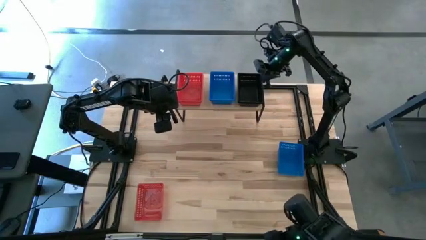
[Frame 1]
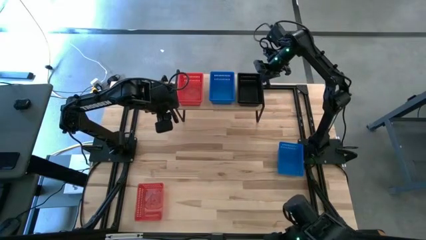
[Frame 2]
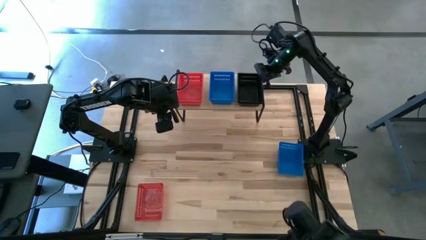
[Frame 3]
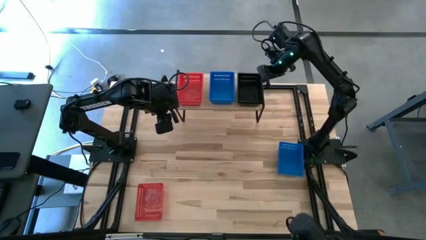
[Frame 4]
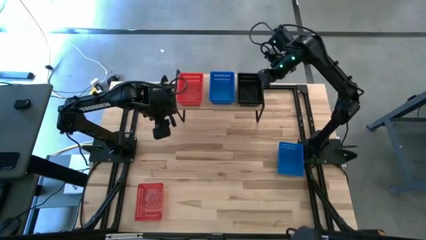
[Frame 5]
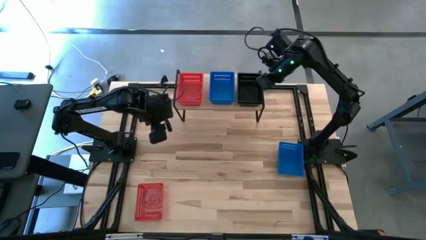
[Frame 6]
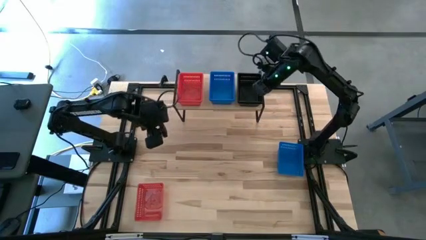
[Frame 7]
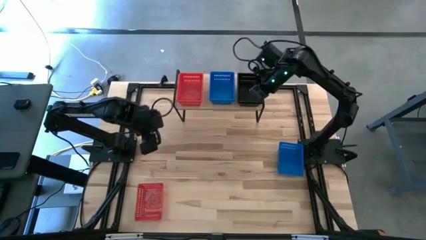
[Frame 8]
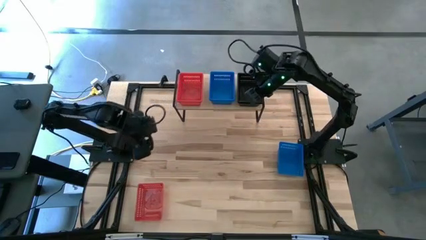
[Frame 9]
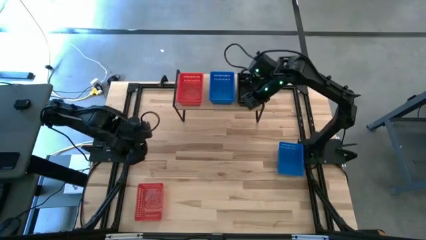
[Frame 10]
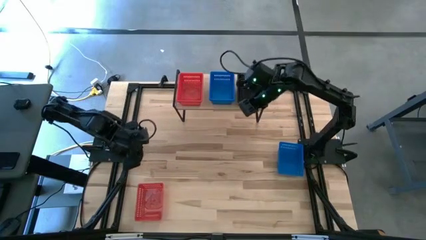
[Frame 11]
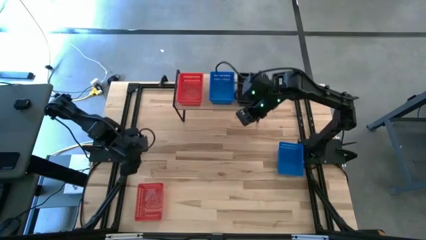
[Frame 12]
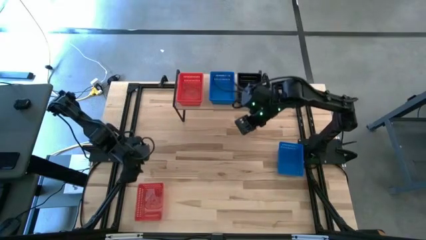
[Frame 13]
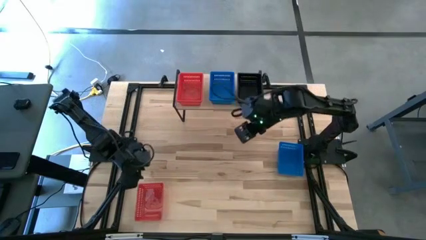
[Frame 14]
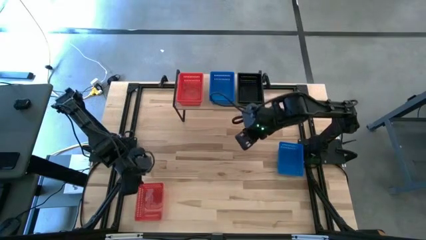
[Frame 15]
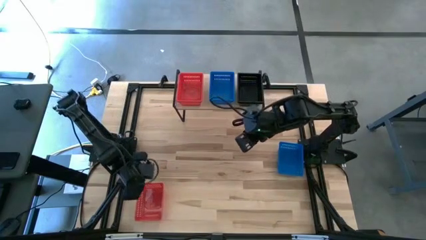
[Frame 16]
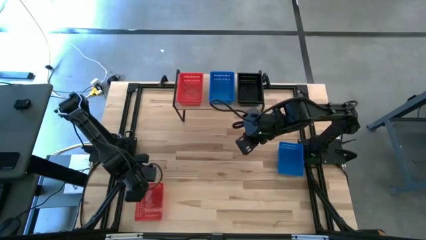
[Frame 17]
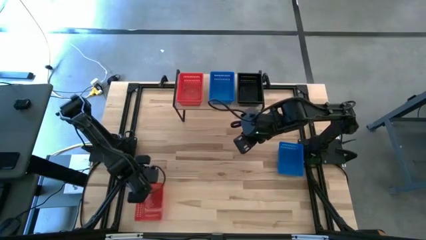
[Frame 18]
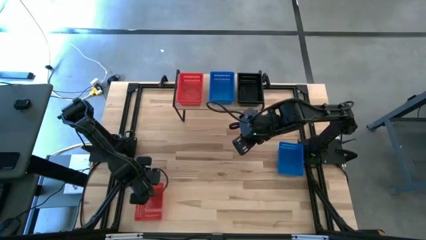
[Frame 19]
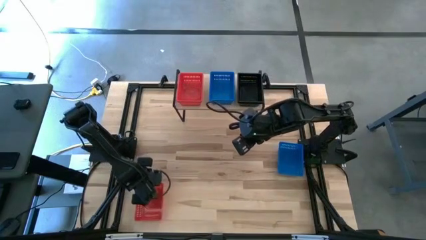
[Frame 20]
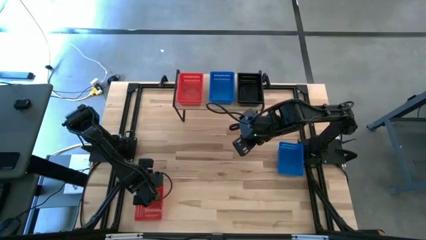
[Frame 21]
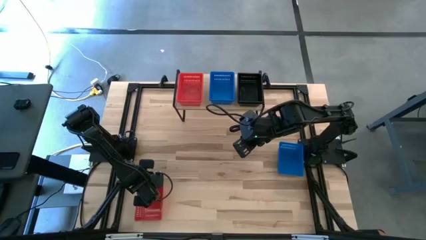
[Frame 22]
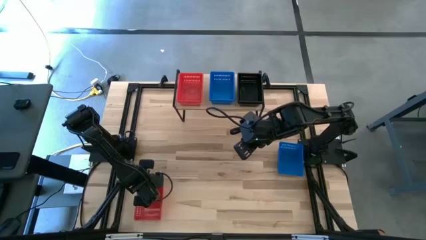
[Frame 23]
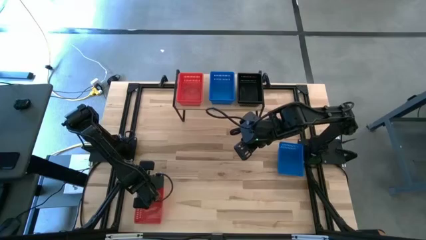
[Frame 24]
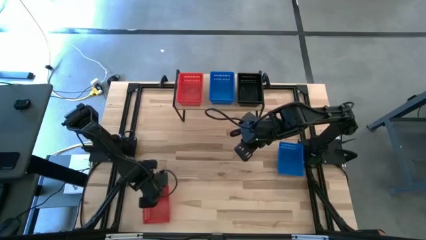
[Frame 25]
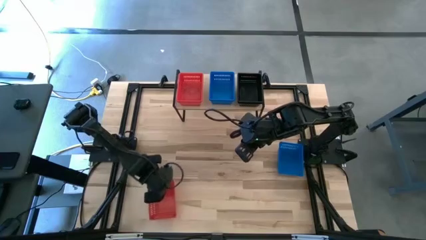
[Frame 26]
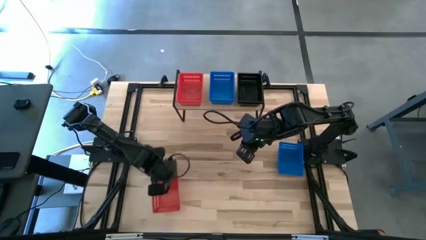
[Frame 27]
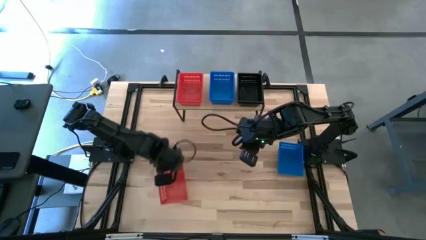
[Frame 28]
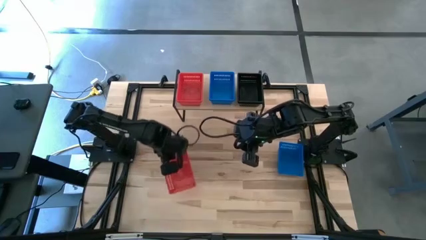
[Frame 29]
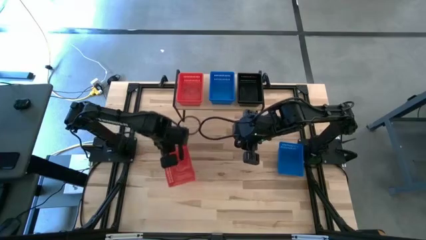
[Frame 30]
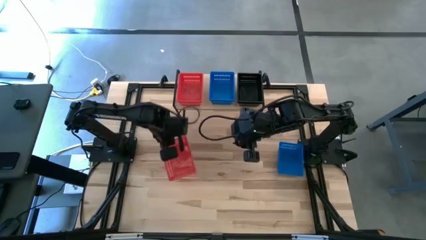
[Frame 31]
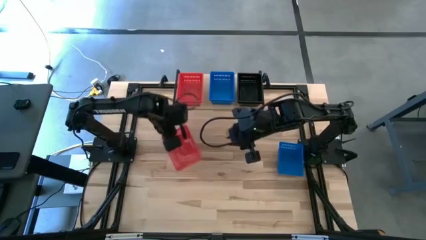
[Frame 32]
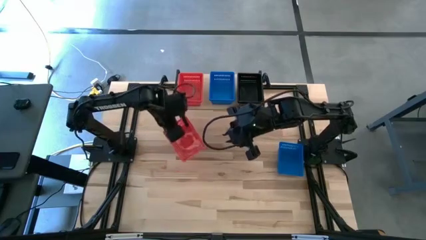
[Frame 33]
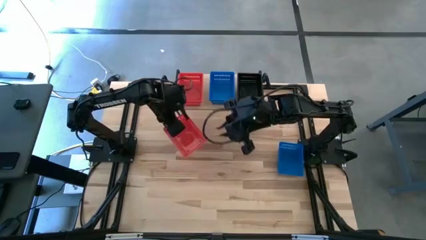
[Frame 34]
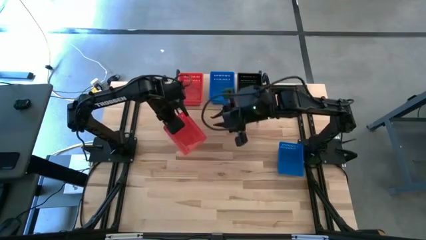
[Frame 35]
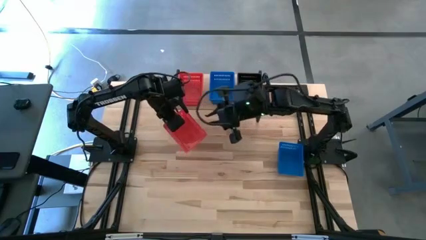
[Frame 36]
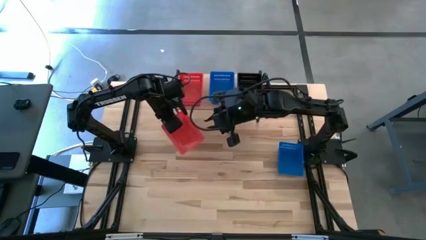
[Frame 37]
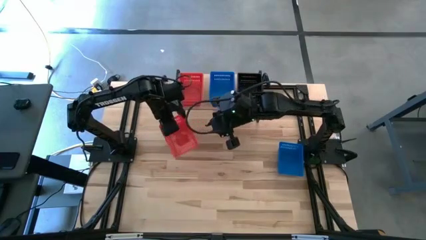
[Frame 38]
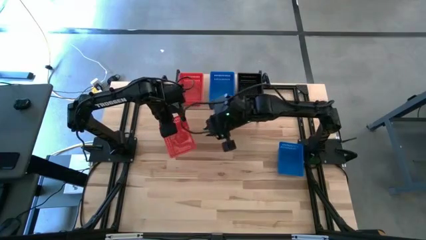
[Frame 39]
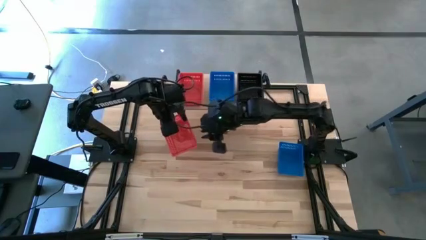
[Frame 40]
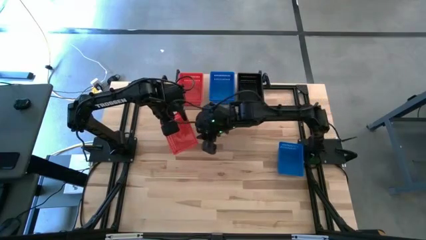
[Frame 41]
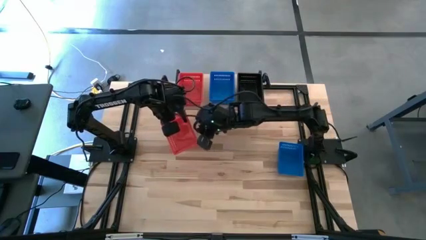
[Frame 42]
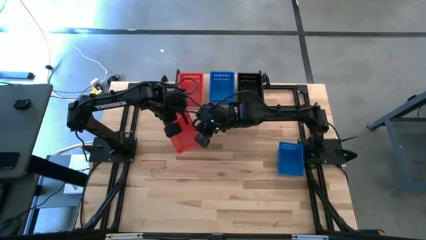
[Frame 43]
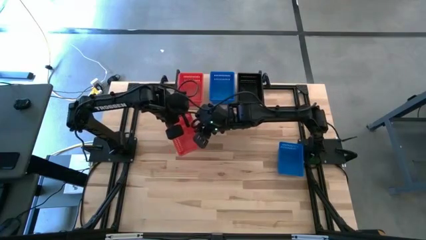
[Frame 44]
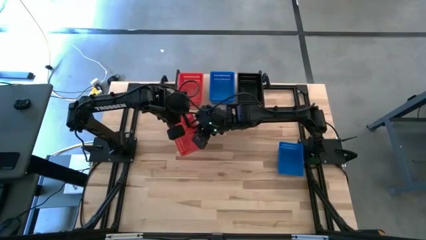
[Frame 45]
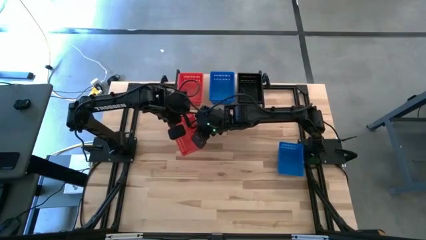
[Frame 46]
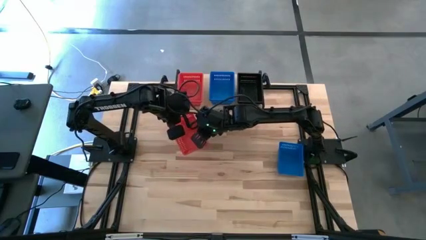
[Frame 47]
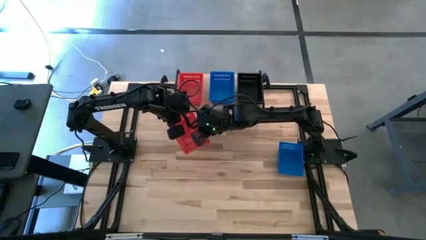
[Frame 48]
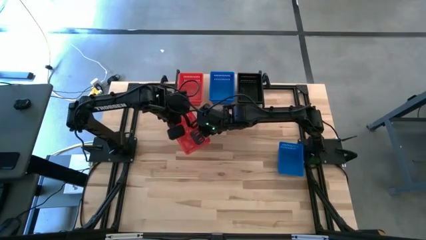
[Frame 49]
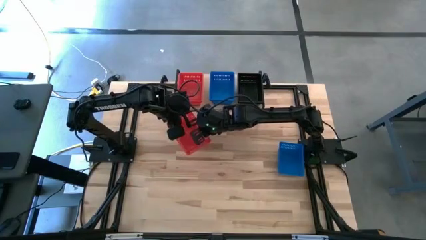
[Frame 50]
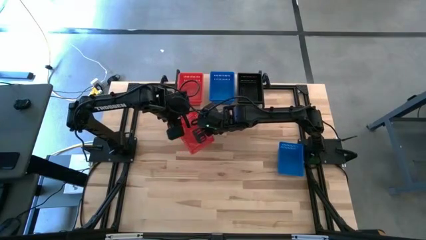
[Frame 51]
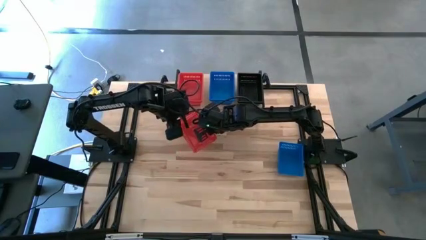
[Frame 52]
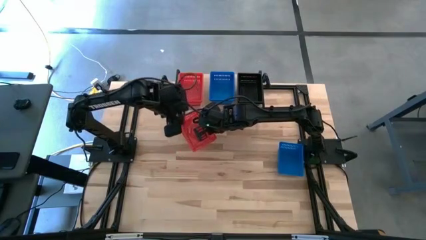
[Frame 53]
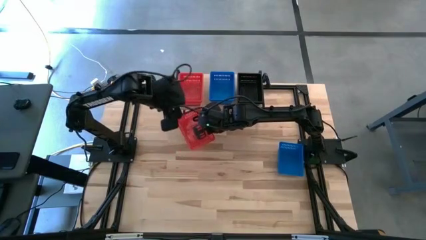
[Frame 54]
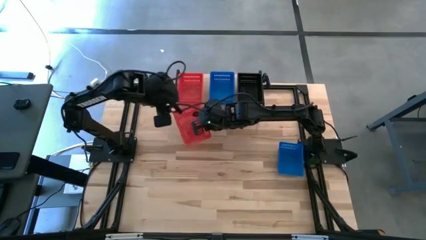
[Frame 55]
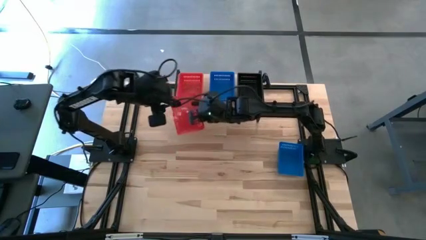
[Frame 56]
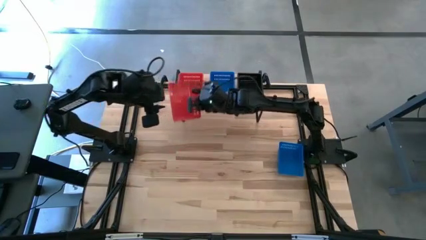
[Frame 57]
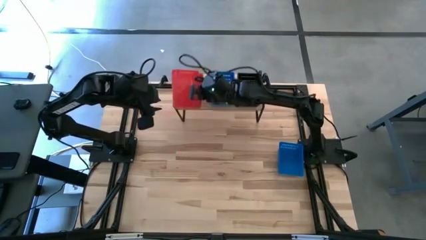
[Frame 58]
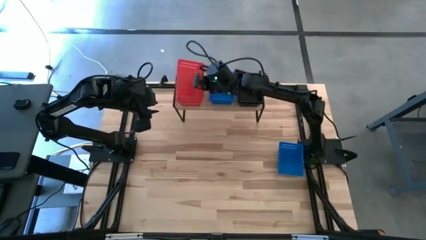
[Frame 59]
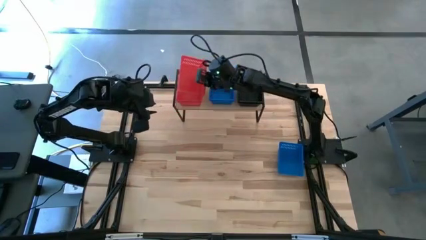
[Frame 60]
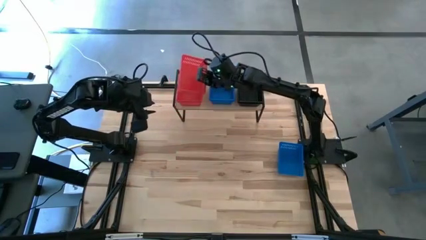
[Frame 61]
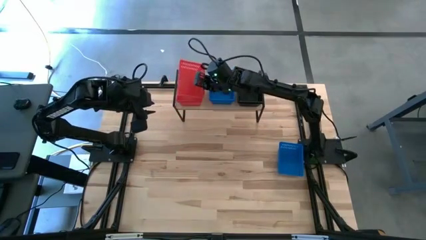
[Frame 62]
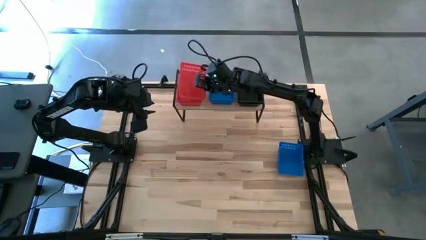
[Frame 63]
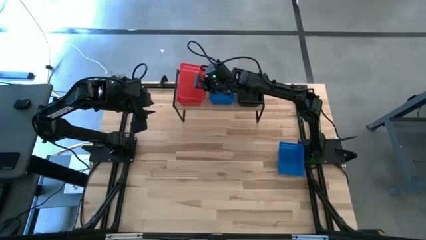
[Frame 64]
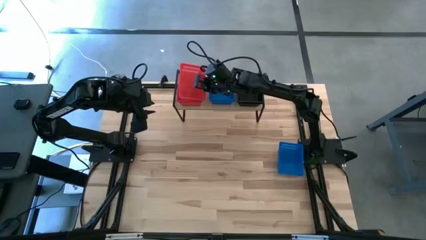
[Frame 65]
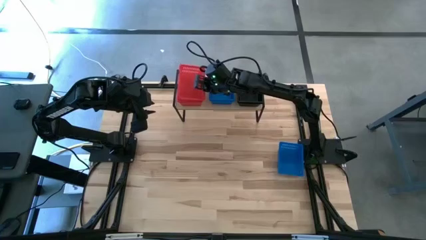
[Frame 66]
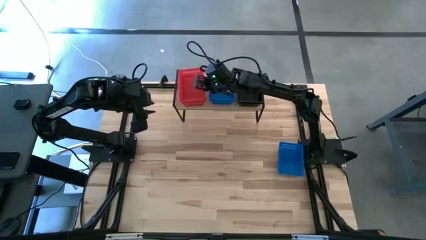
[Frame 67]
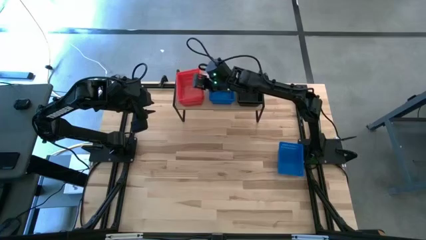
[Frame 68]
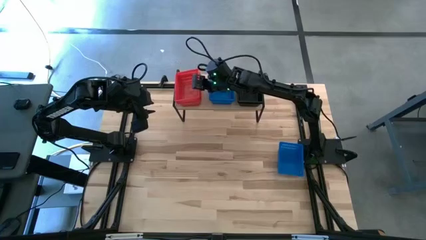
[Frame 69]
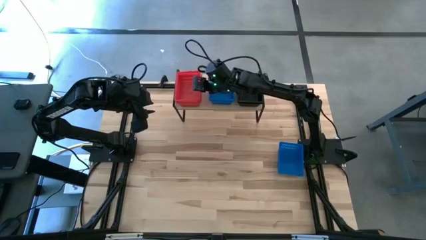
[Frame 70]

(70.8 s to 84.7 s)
Task: Stack baskets on shelf by color
Stack the red basket on top of the red basket on the shelf

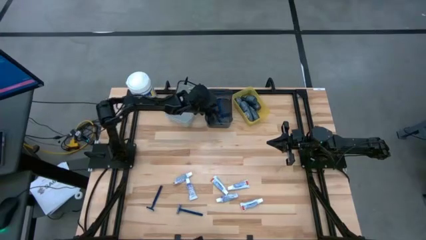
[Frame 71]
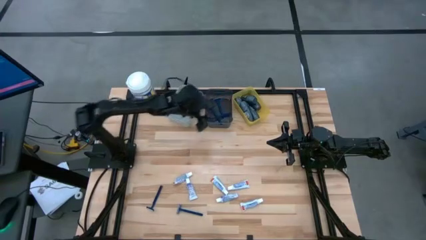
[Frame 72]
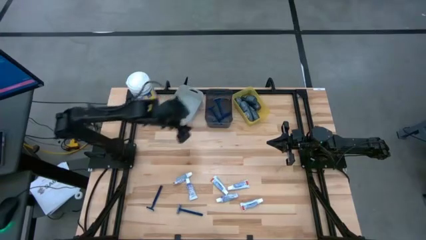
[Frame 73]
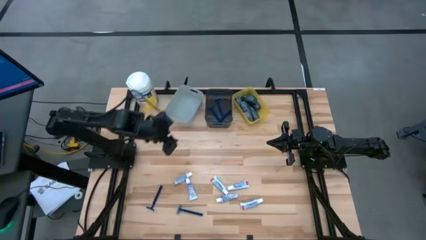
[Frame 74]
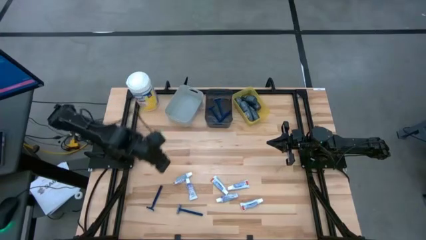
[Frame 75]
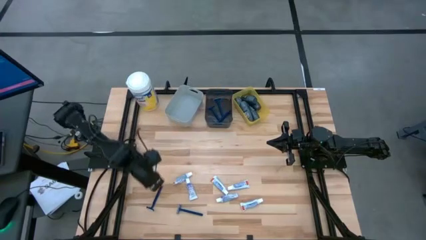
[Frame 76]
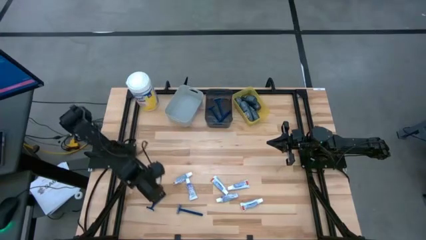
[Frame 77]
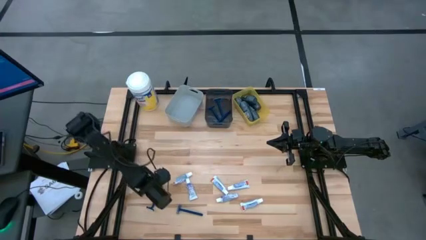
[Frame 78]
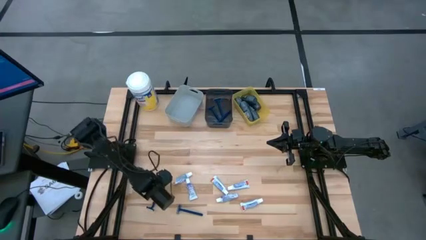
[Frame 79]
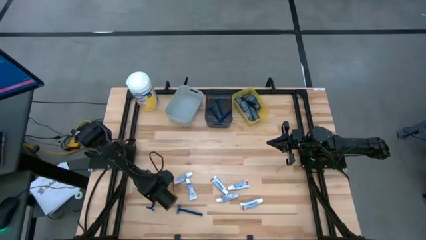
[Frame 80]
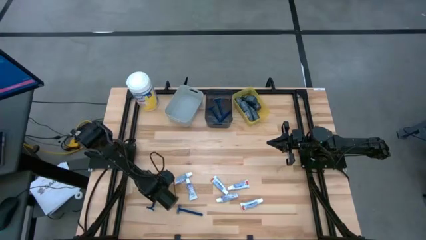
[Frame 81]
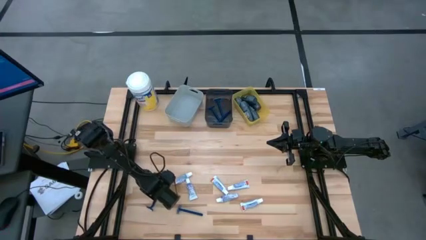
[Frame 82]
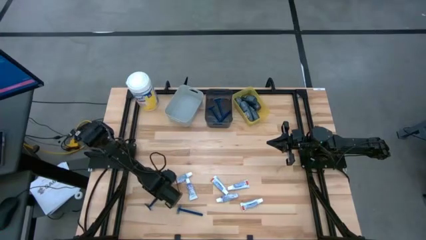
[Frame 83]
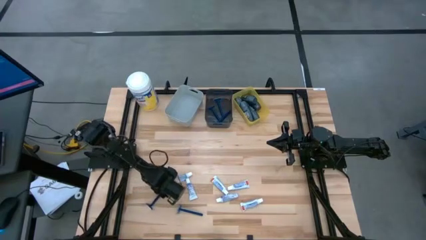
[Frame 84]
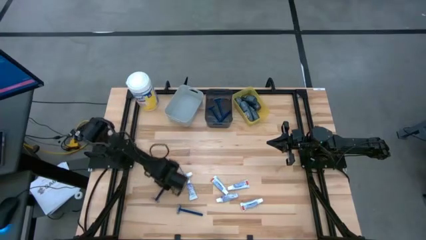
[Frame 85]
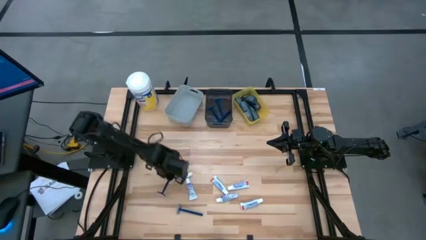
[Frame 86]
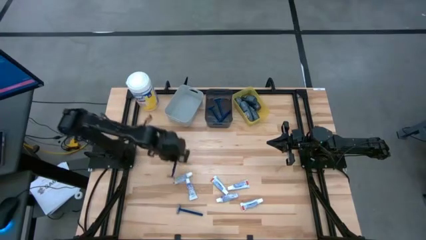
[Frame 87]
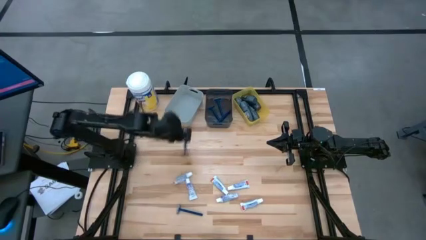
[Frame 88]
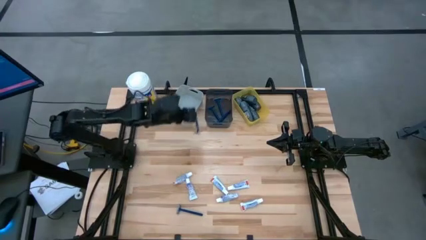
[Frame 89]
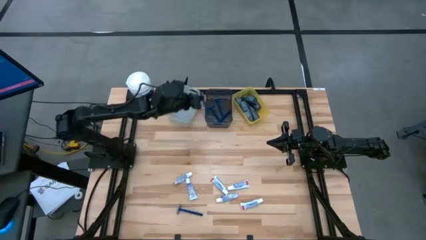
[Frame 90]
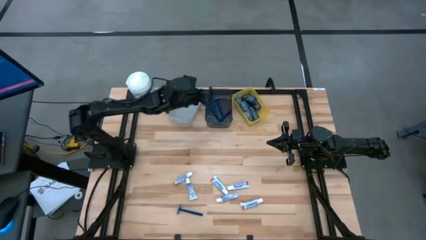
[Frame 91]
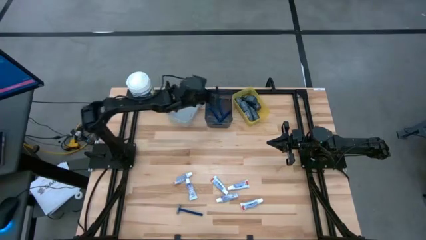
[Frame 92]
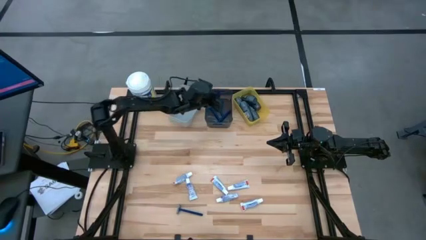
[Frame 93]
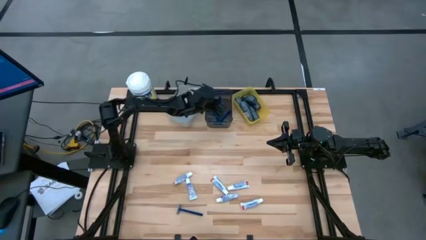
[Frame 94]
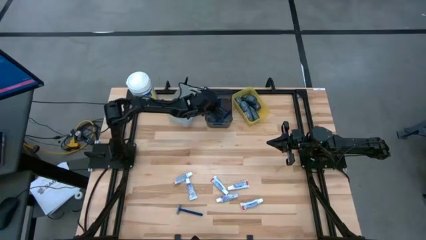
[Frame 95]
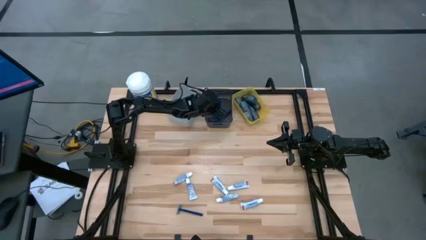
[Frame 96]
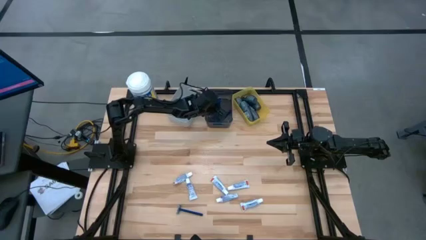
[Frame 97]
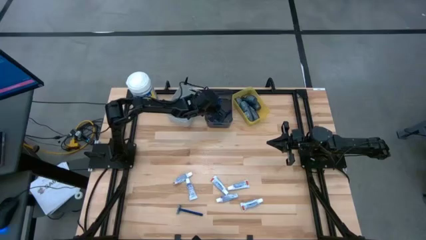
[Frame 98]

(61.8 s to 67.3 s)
Task: Pick & Place Travel size toiletries
Put the razor into the black bin
